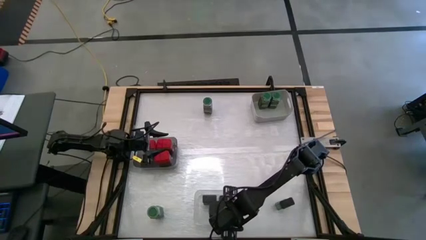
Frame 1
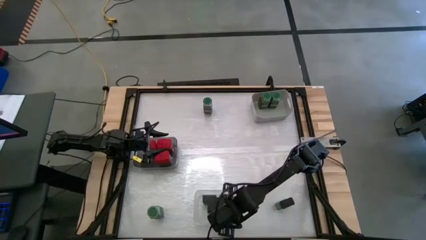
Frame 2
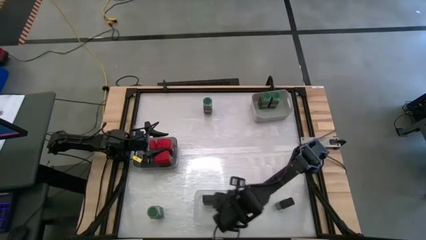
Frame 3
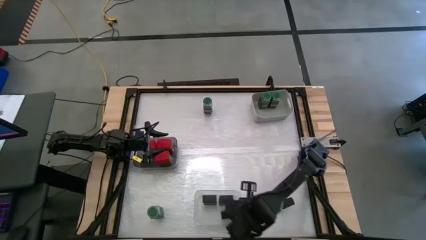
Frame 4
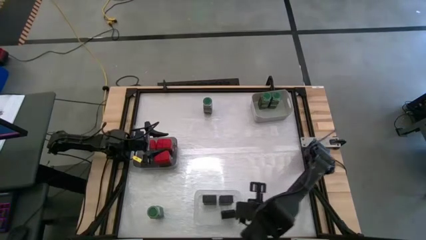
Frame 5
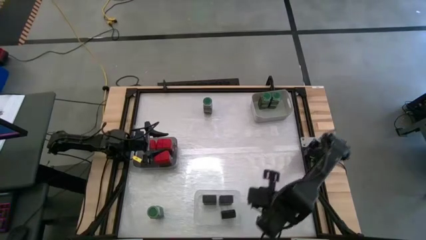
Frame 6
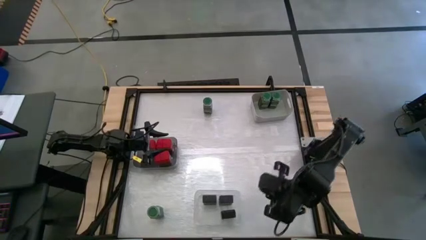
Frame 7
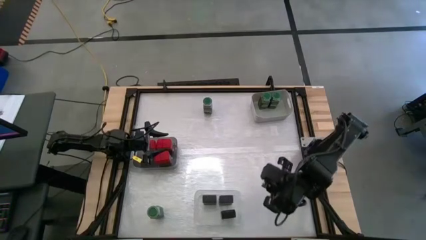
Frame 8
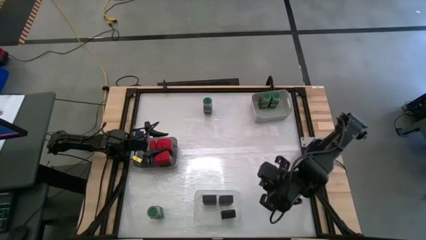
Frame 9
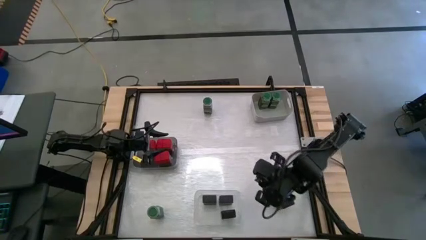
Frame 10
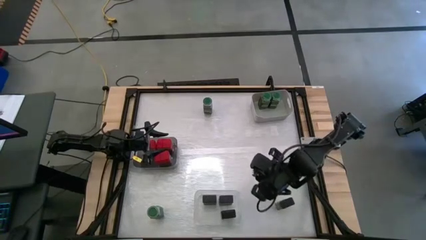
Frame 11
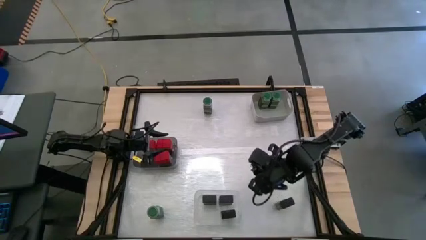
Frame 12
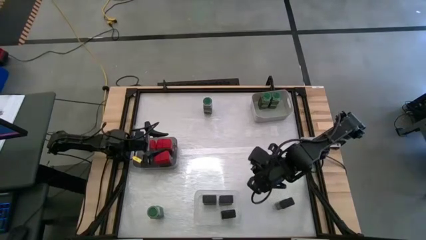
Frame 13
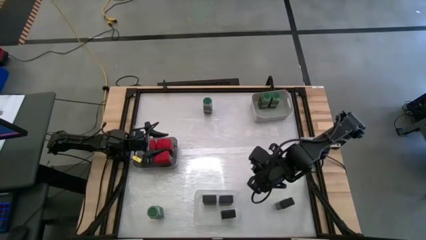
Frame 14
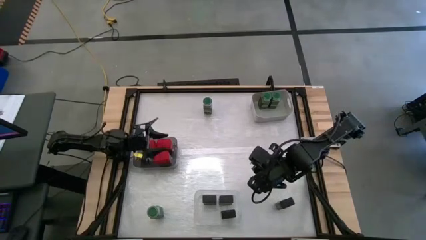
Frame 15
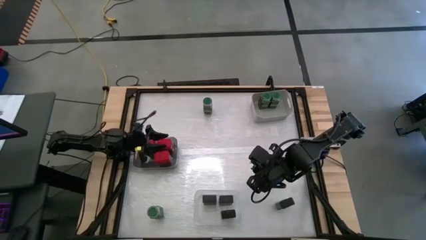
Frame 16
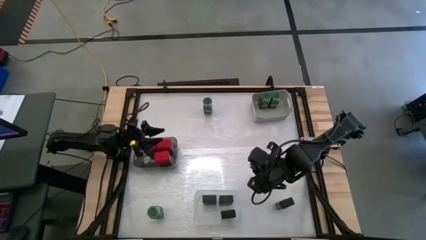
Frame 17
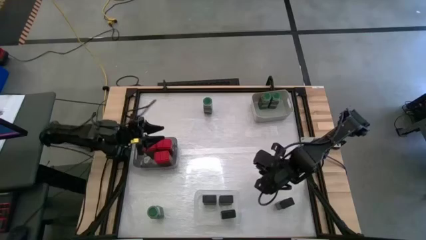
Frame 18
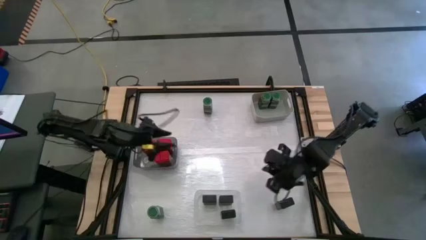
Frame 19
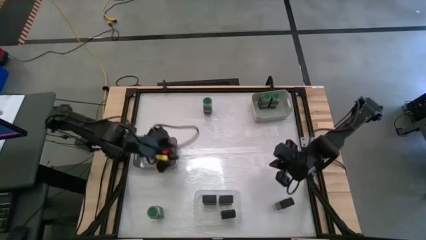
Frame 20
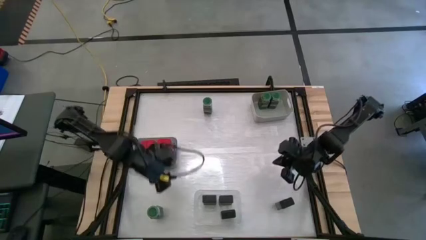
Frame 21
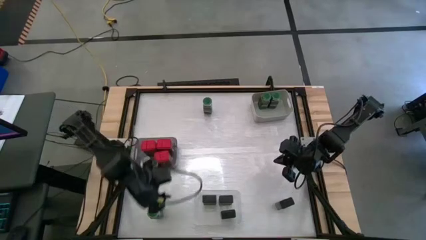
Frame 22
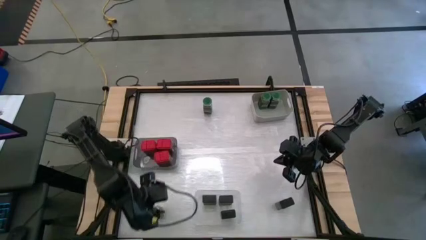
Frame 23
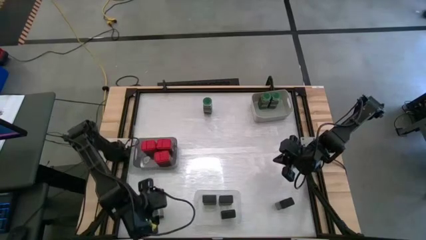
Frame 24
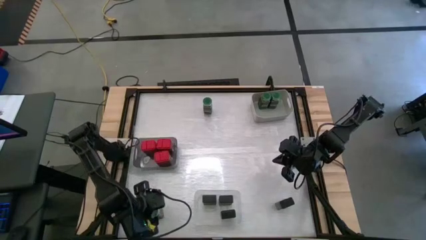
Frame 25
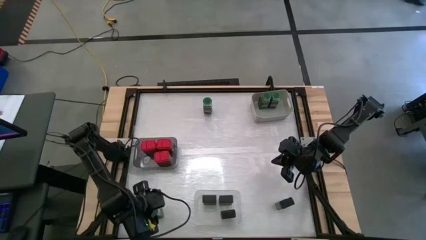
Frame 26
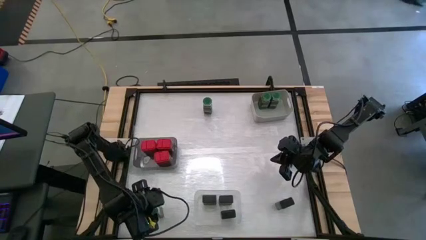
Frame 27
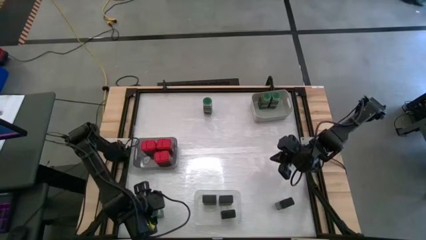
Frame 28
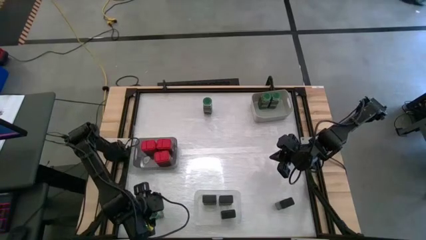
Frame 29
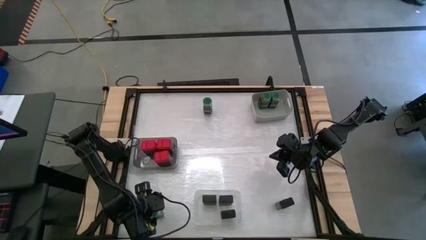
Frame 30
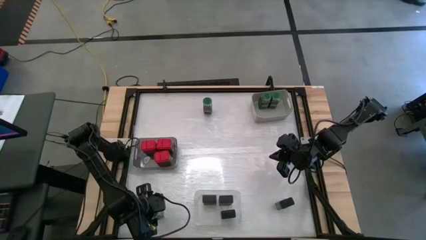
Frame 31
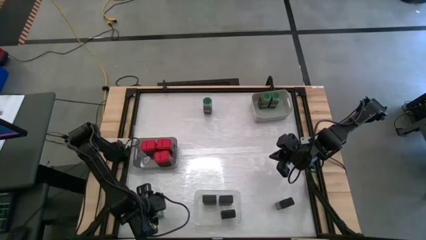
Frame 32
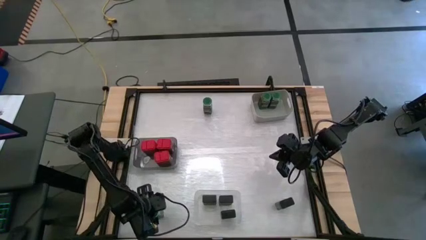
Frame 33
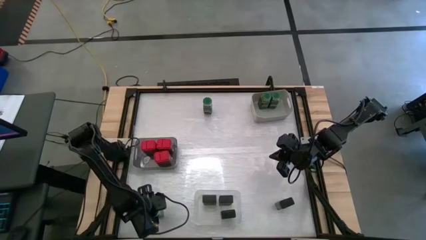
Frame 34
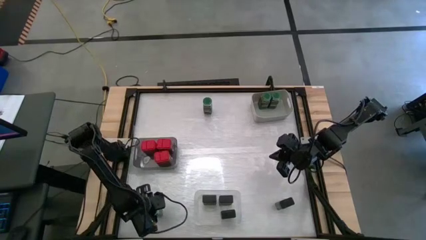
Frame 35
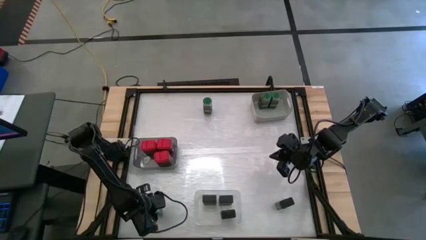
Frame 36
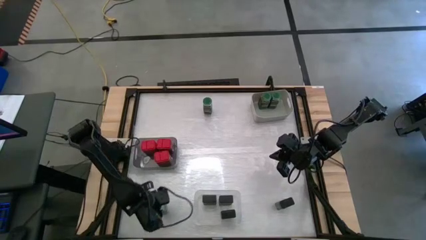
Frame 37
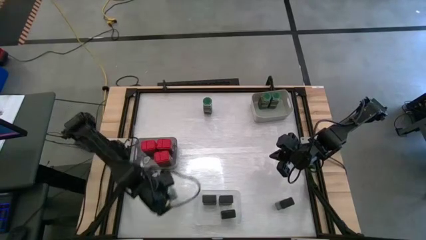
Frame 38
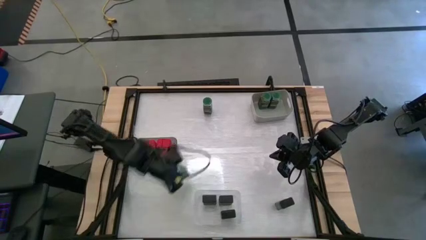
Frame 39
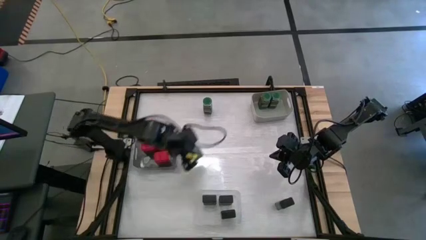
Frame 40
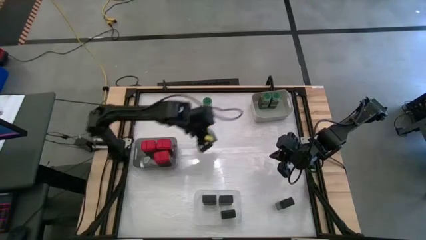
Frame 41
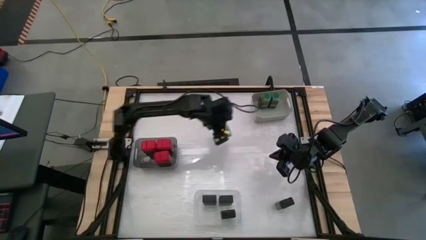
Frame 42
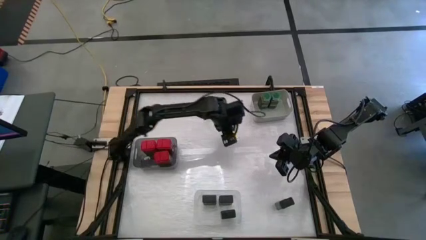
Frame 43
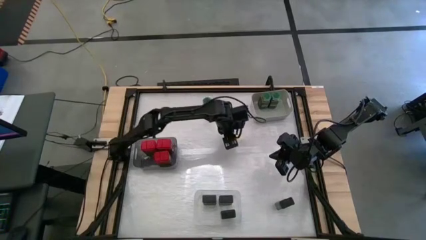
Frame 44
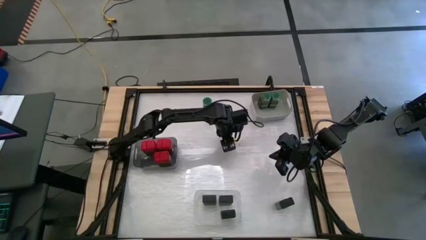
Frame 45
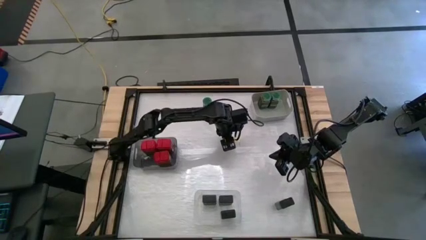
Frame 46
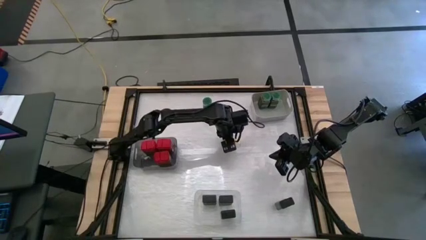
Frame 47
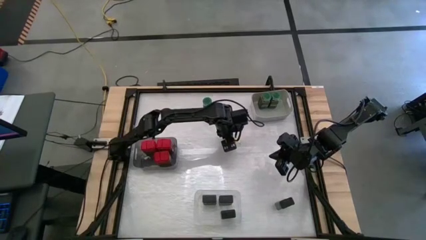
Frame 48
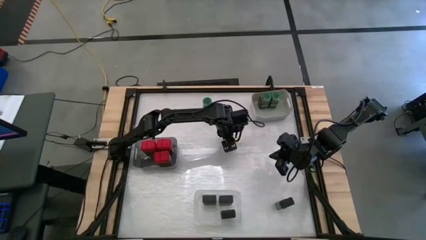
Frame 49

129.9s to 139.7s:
Task: Sort spices by type
Put the bottom green seasoning bottle into the grey bin

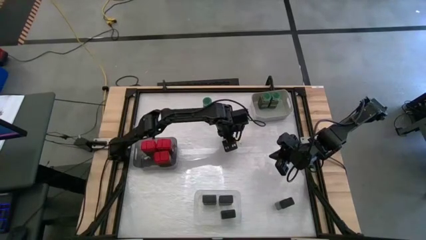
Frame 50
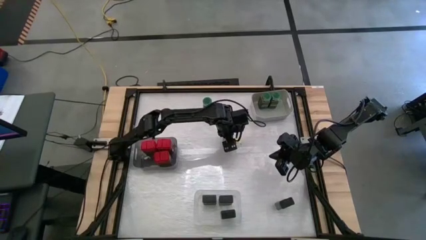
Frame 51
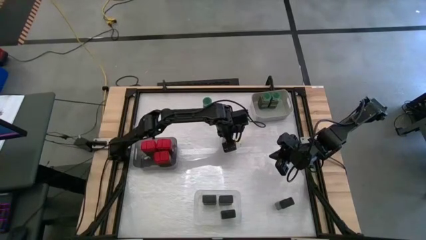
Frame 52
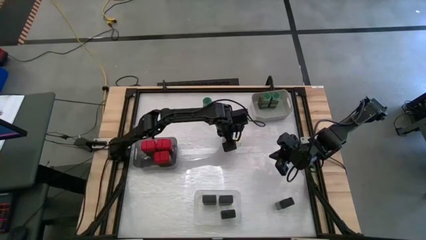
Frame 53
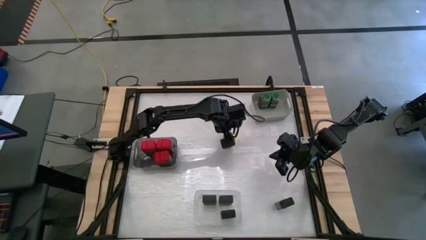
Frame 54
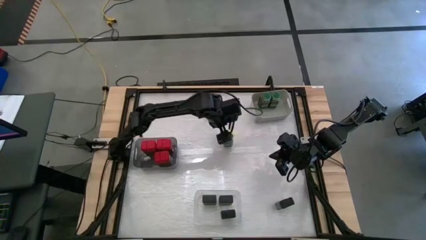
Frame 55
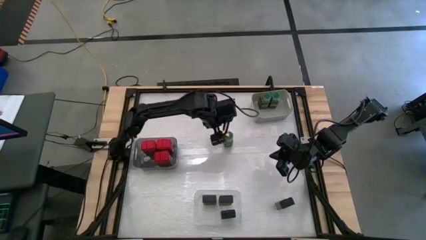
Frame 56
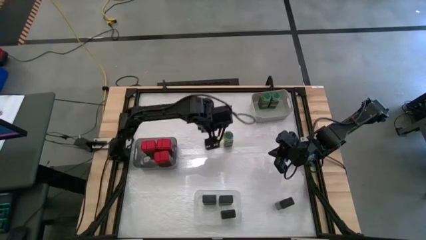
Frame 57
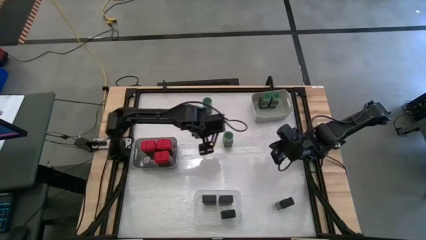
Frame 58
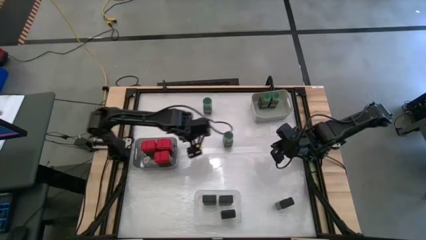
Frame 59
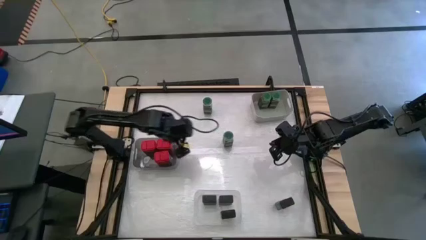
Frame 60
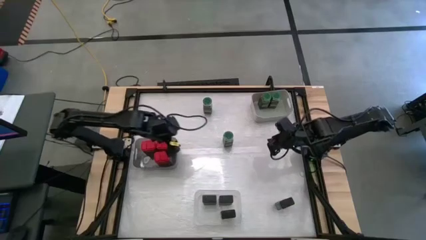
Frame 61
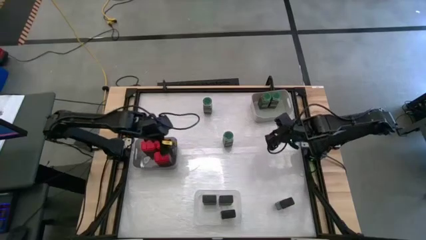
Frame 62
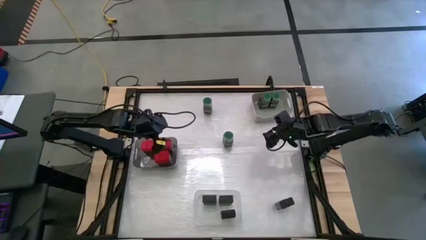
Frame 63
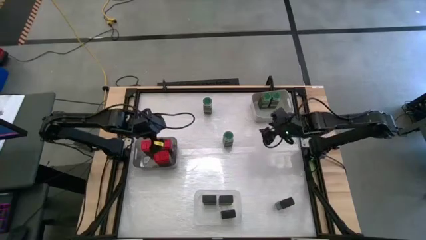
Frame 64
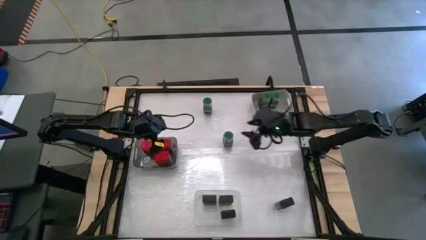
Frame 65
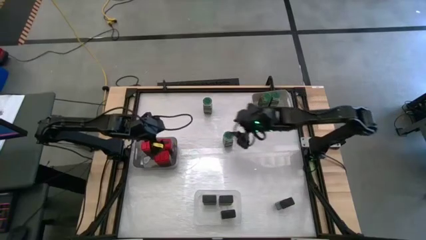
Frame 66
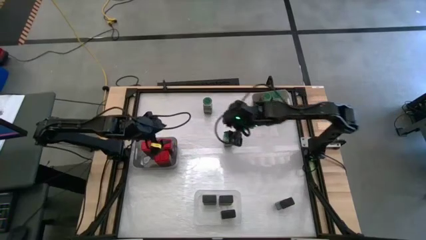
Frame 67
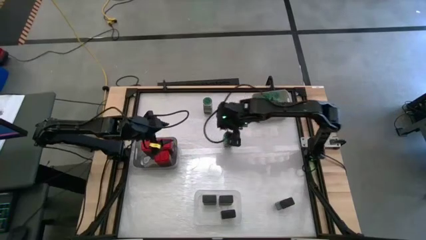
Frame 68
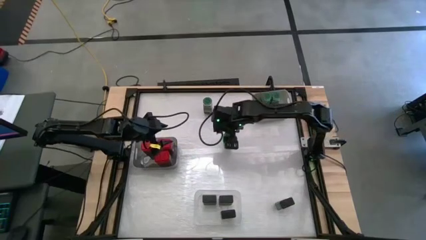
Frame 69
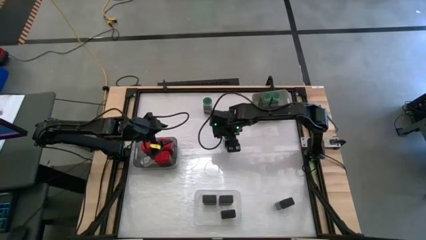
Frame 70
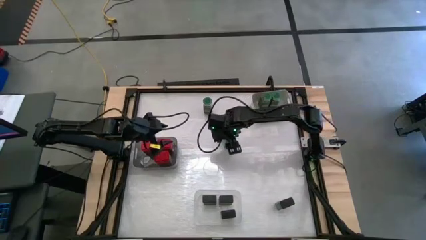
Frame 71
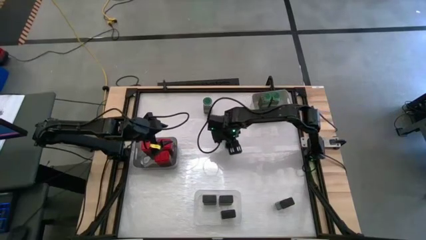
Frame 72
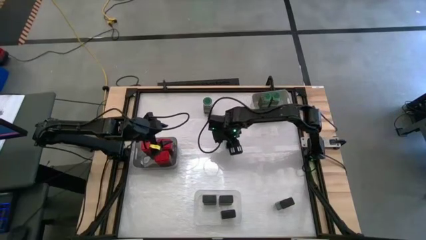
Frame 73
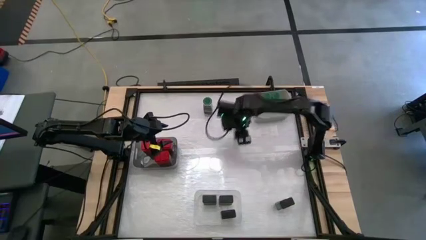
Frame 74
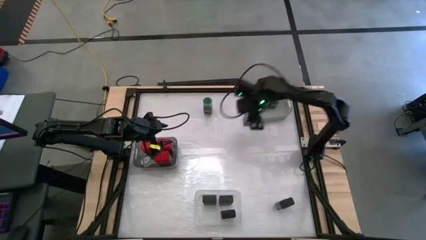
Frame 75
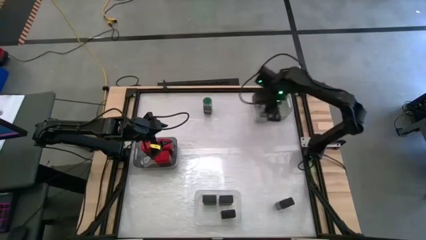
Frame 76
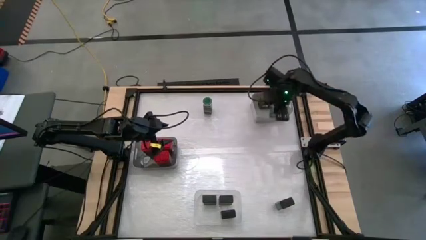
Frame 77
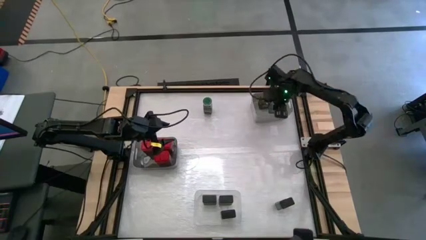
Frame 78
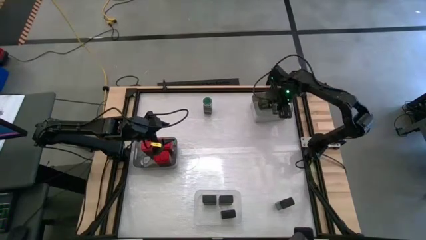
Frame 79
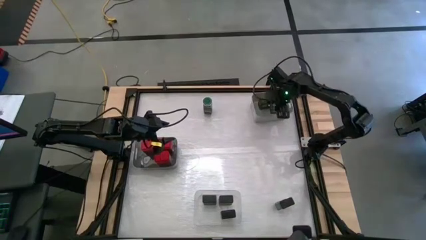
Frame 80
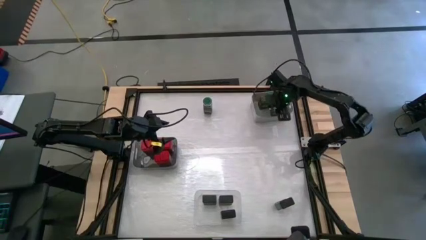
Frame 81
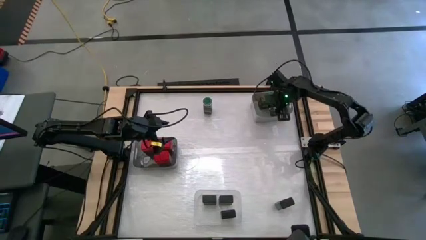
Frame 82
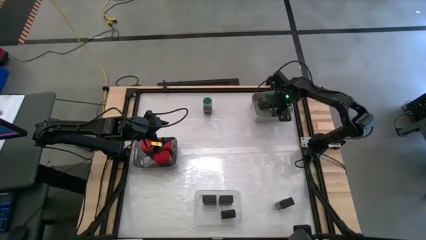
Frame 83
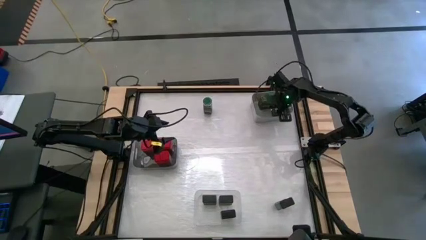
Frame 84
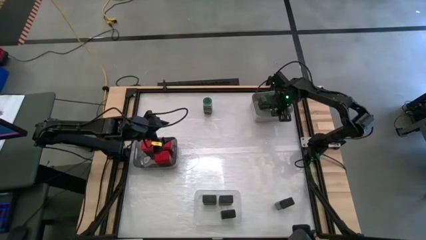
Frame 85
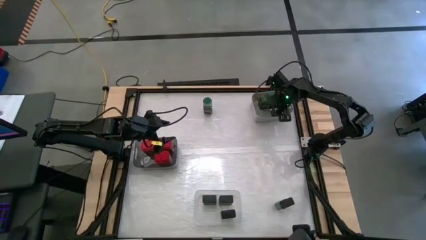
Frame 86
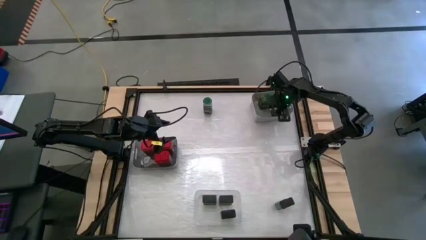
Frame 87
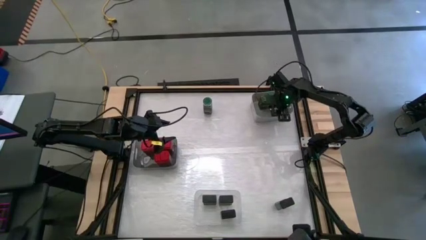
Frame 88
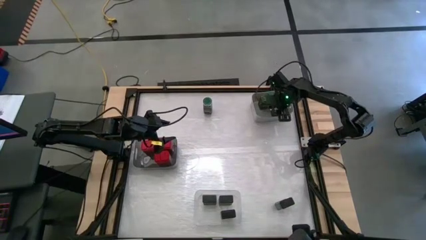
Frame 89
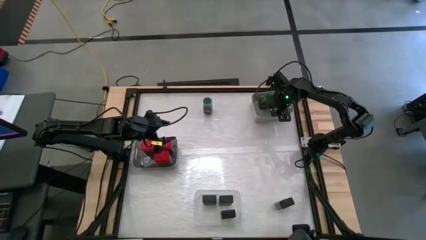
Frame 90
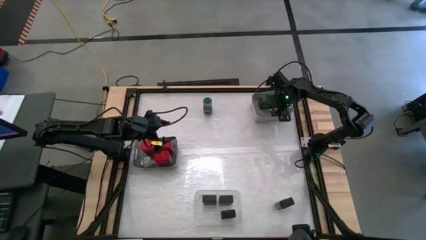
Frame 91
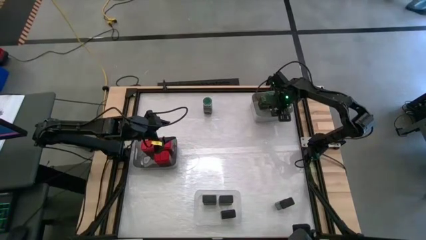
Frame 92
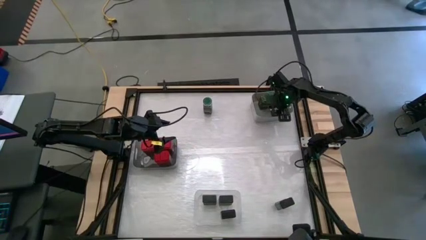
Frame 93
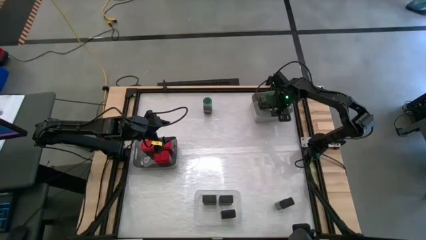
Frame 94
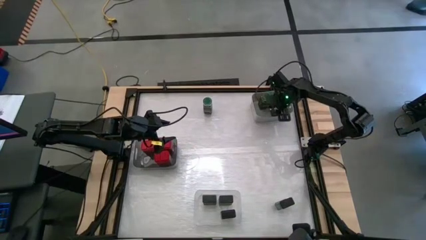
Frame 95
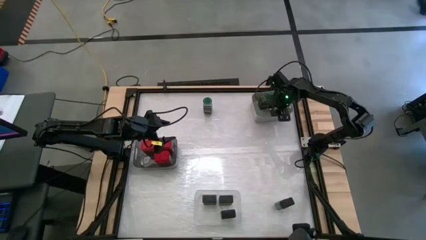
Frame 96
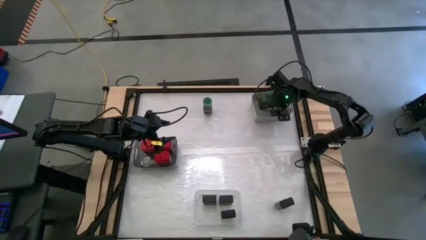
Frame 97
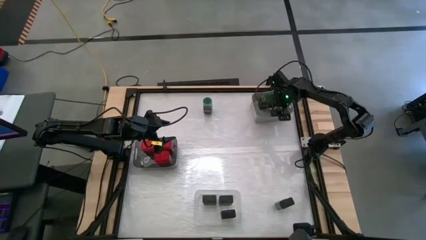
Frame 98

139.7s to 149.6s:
Put the bottom green seasoning bottle into the grey bin
